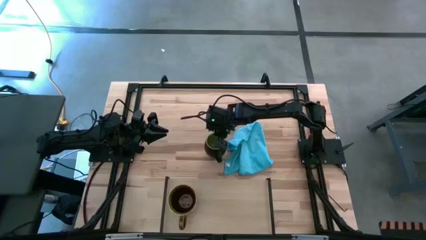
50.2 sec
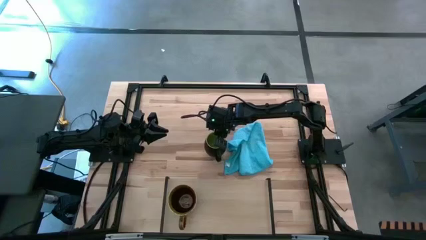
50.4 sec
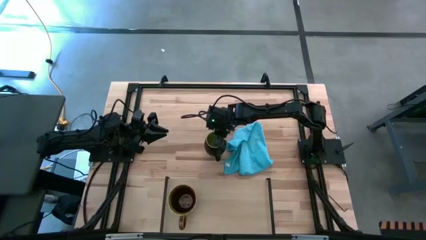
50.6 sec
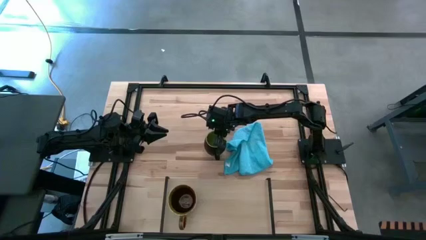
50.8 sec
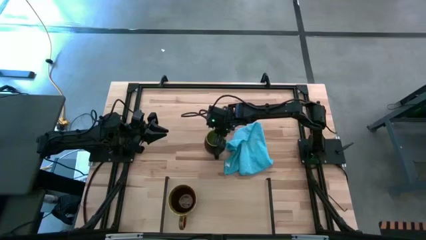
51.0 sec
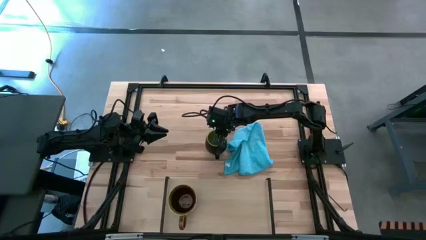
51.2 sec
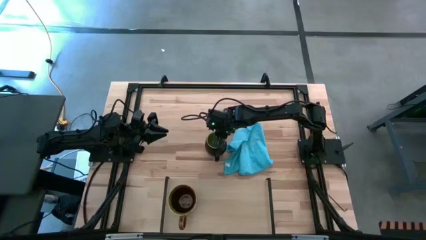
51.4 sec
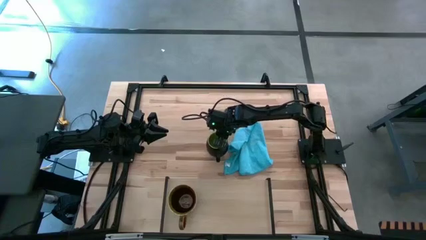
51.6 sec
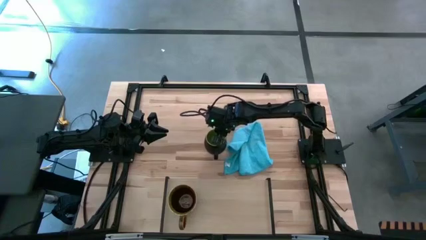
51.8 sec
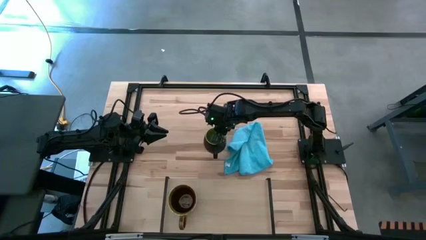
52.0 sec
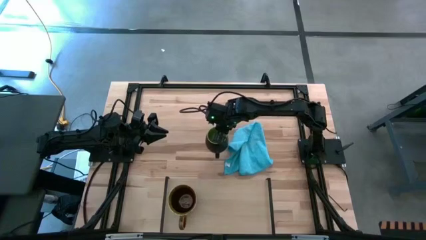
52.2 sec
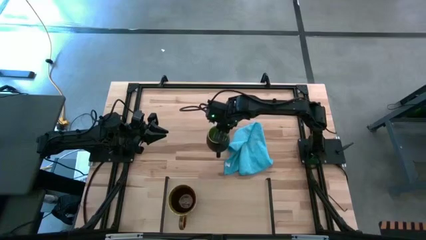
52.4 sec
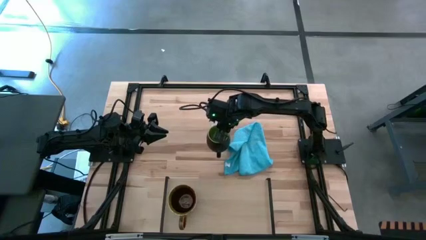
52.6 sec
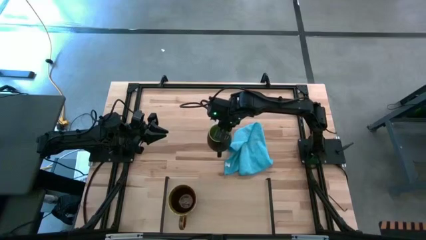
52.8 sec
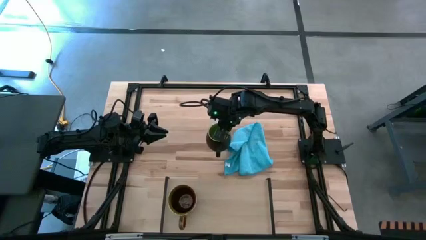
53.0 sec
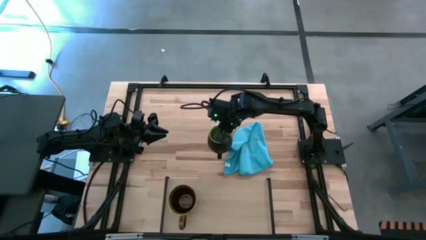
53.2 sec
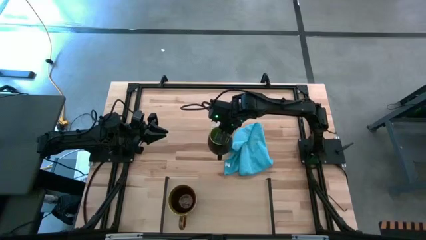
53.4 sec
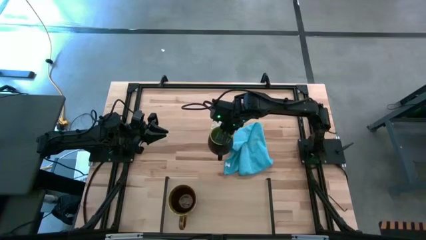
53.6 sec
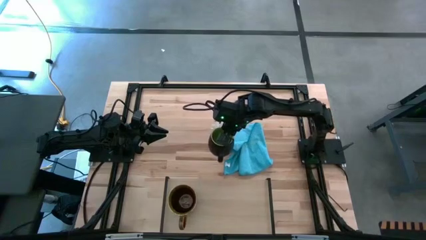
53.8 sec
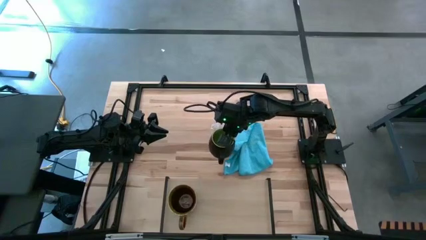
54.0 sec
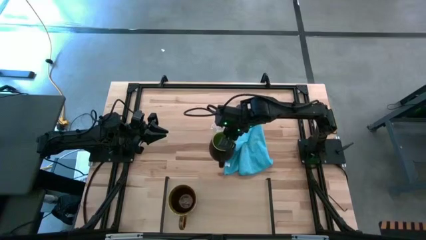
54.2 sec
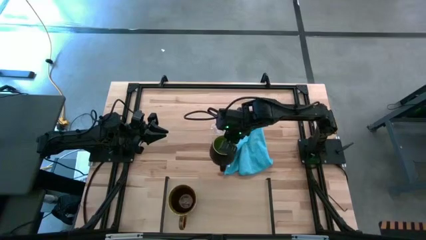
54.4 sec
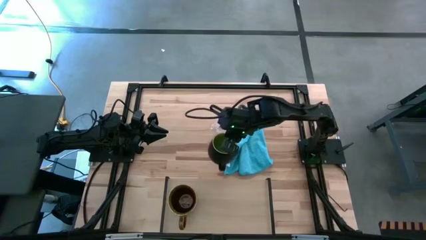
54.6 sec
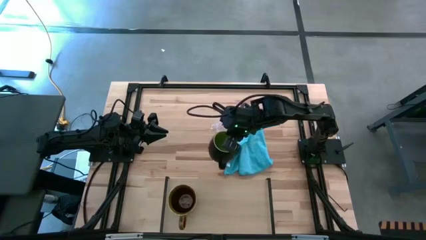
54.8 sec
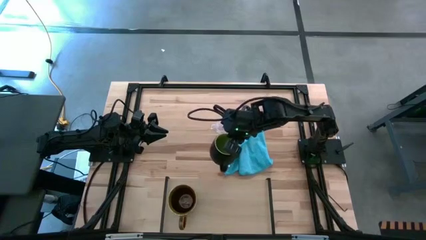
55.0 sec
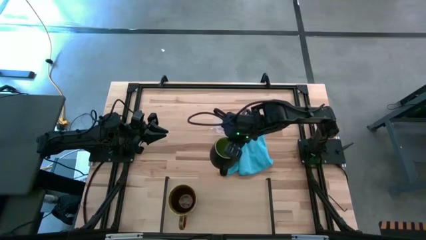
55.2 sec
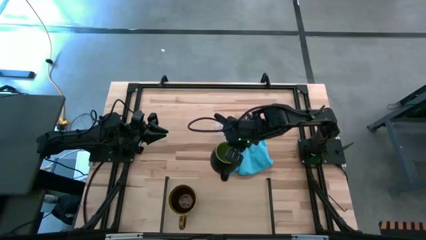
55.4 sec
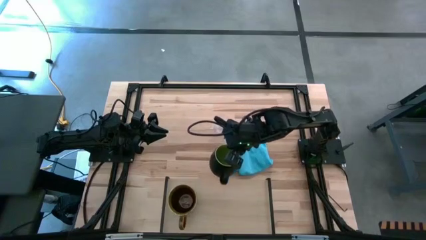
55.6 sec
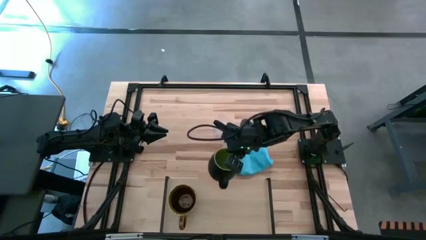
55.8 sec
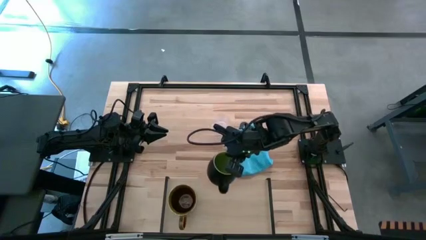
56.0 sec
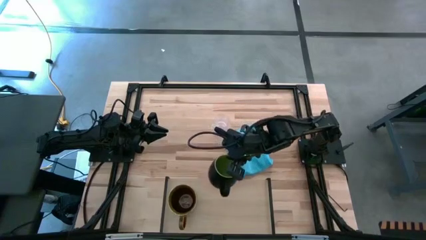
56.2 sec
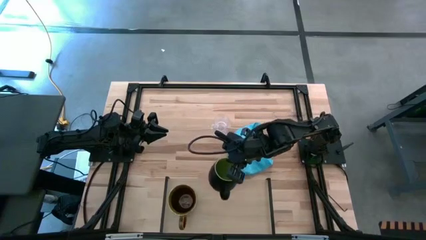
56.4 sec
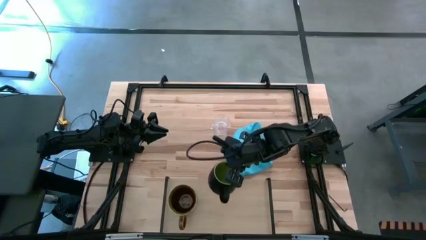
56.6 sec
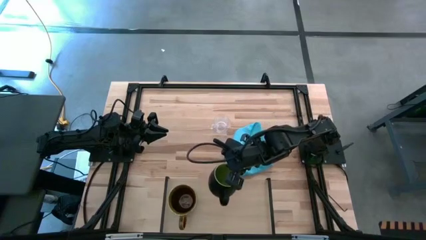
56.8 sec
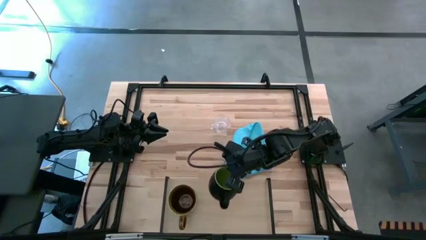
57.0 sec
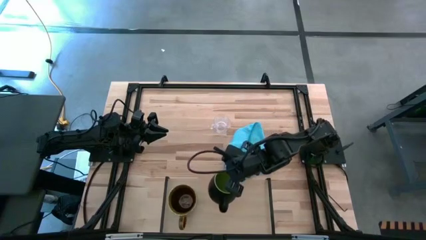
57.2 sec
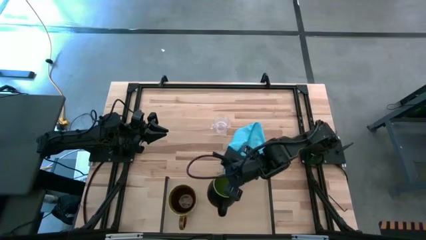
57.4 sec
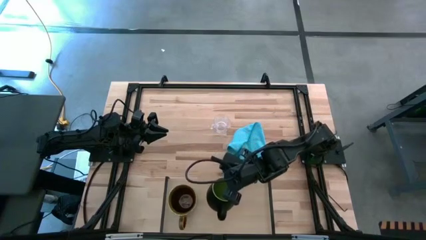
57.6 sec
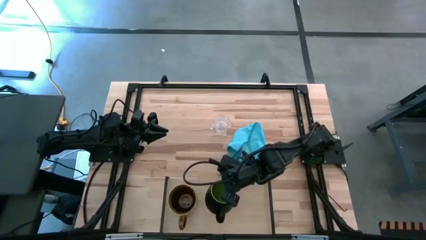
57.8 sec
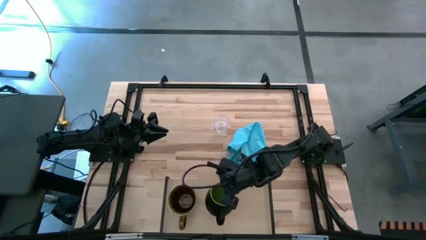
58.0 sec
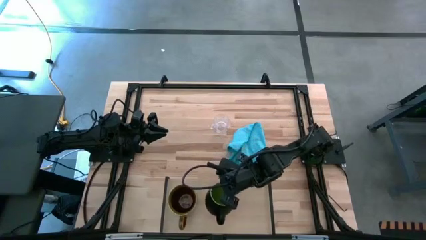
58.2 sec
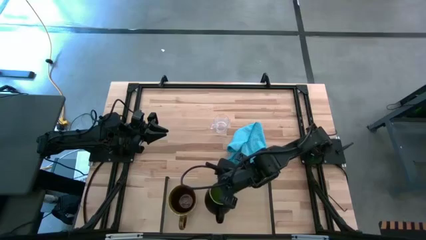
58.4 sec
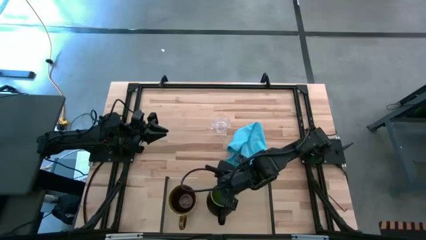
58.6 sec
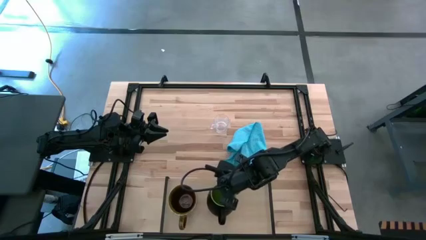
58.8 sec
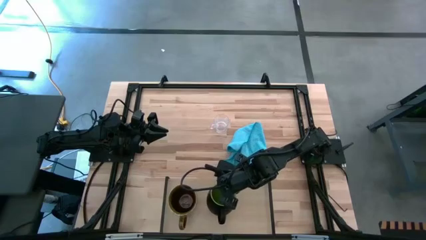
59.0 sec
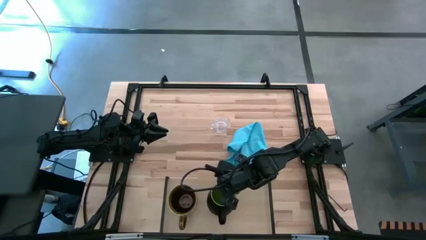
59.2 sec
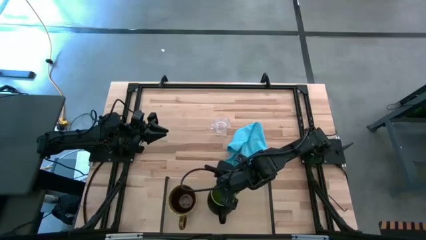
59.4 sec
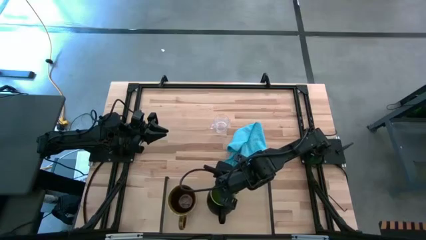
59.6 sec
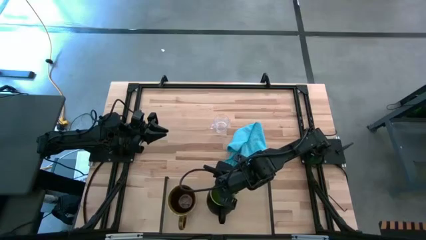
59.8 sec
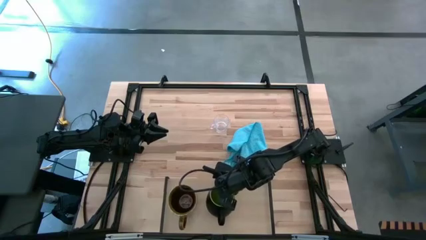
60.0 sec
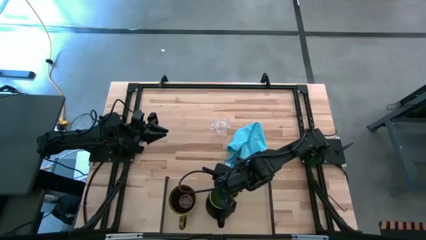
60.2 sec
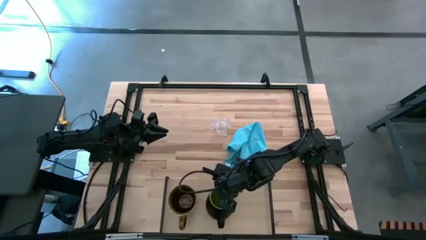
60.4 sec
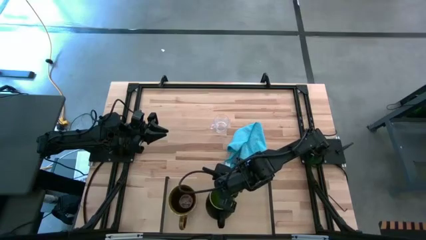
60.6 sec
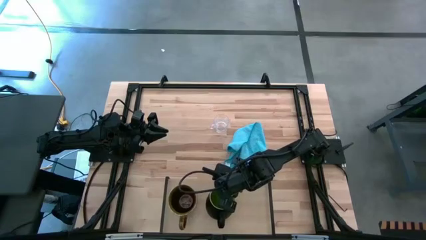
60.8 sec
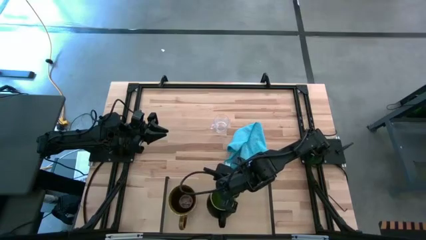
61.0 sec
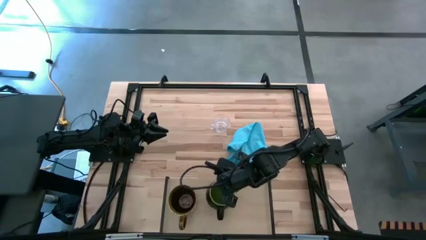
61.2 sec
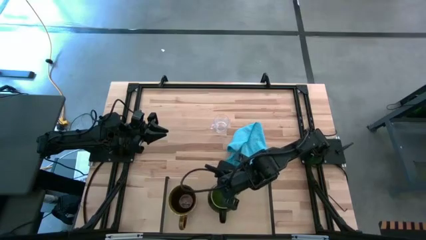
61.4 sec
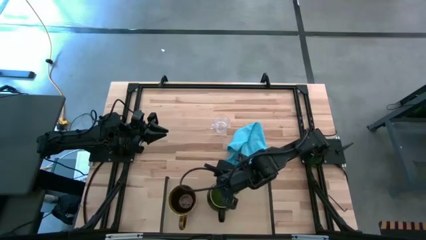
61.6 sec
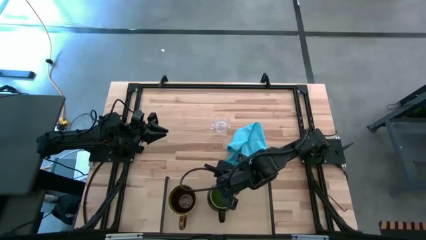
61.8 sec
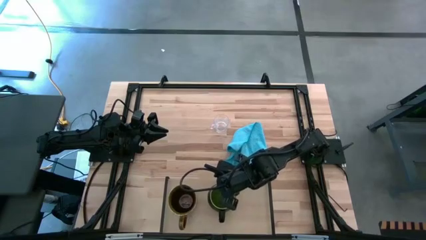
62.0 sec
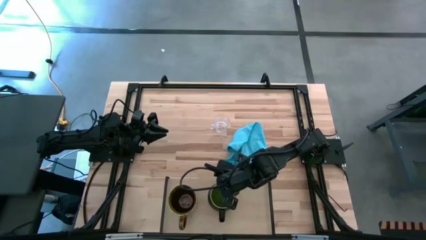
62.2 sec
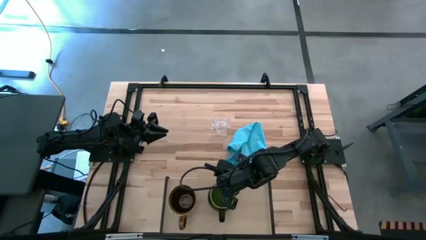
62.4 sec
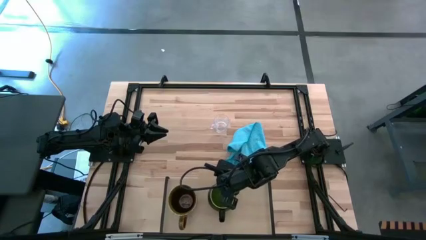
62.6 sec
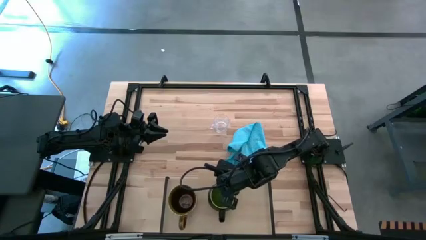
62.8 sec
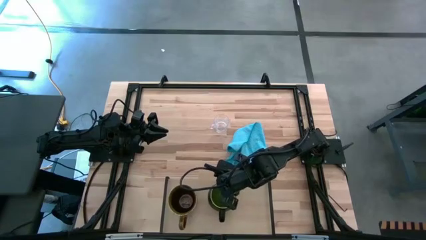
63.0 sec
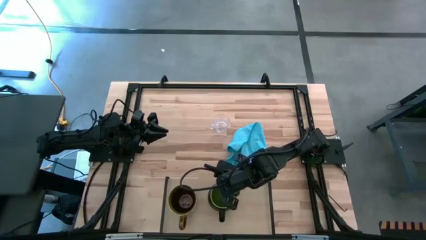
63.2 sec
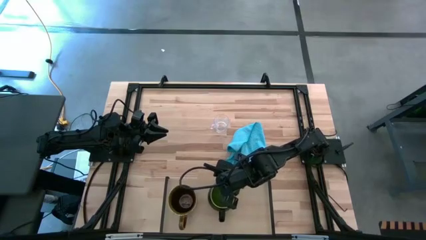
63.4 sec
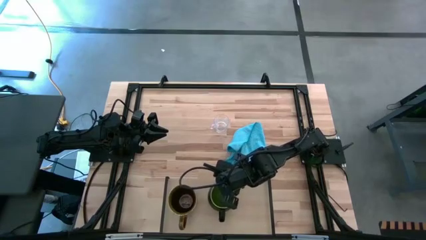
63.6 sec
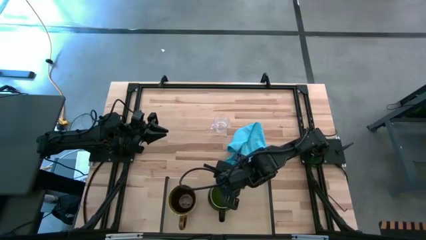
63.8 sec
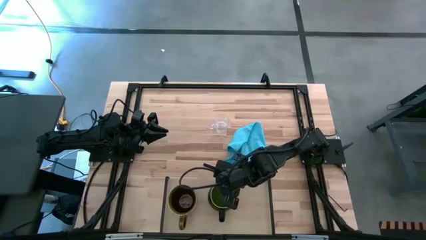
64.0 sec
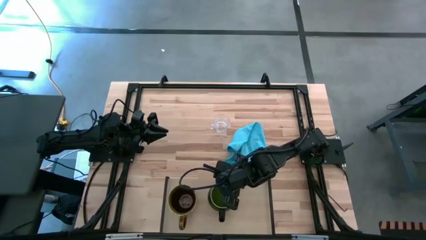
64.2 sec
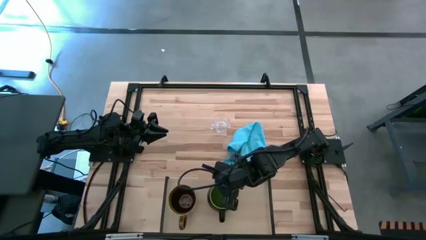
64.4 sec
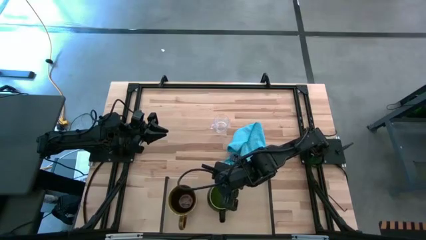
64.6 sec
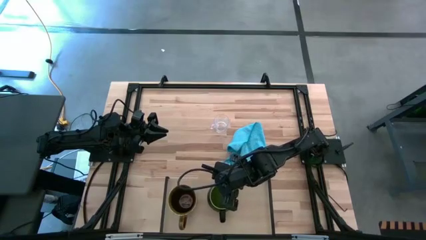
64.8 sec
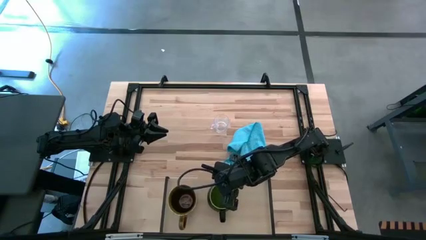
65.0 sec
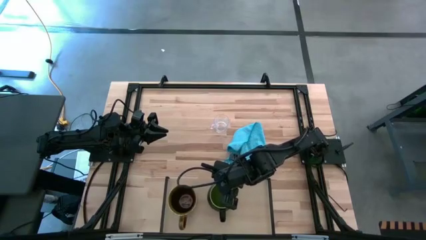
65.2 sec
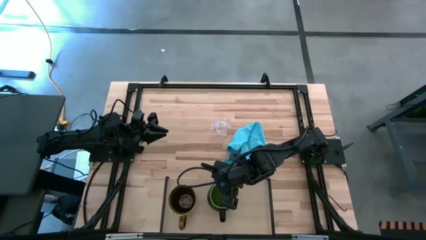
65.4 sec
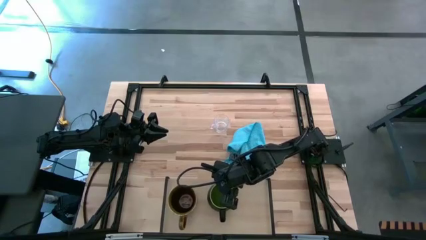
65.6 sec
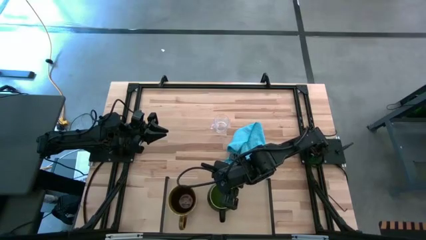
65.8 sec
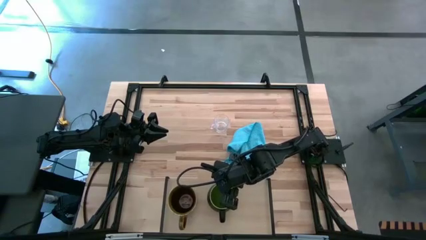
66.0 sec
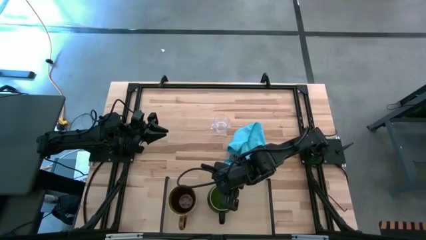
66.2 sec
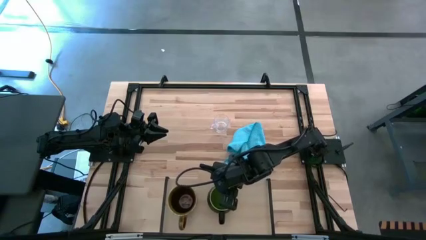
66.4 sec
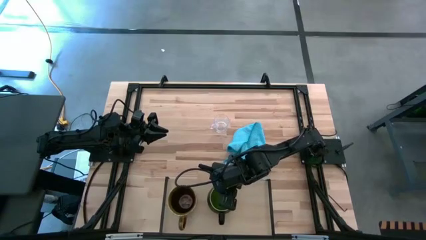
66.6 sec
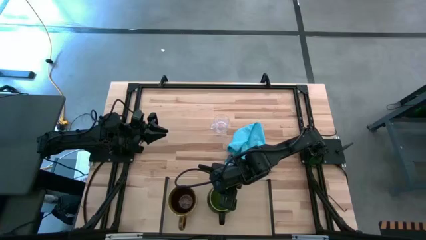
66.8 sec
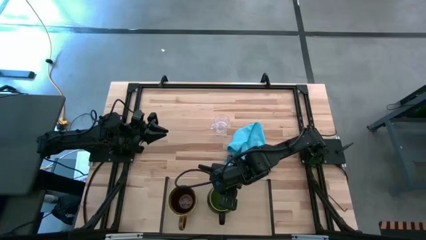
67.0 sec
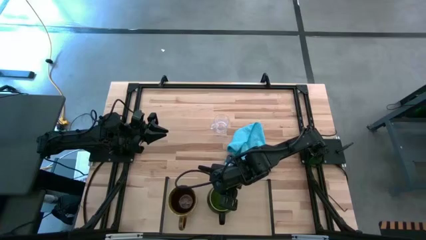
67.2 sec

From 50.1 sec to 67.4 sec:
Task: Stack small to large cups/mugs on shelf
Put the black green mug on the shelf
